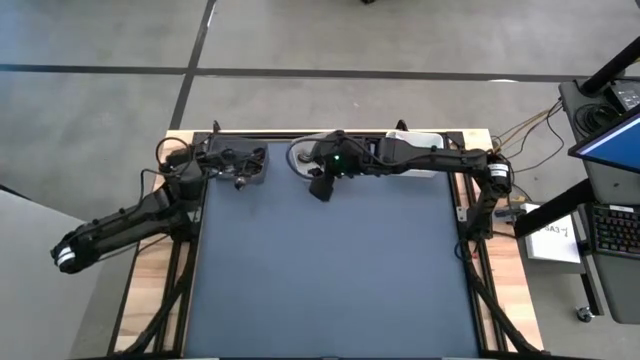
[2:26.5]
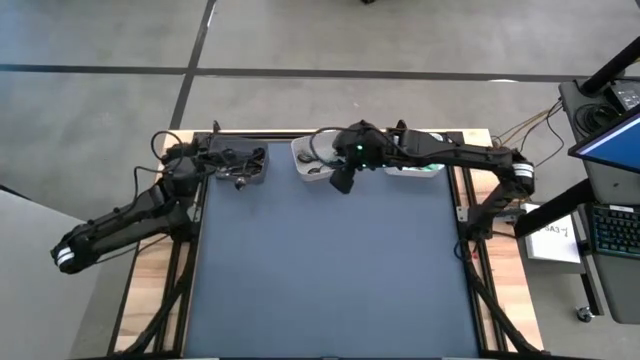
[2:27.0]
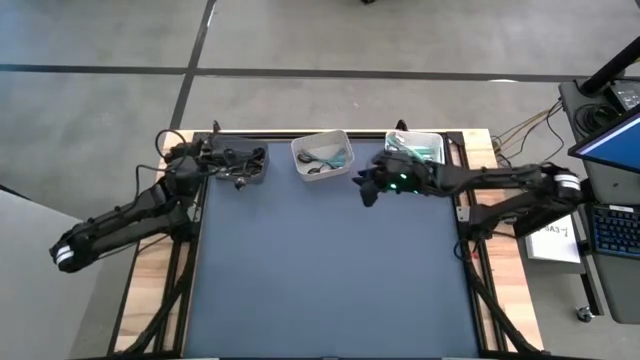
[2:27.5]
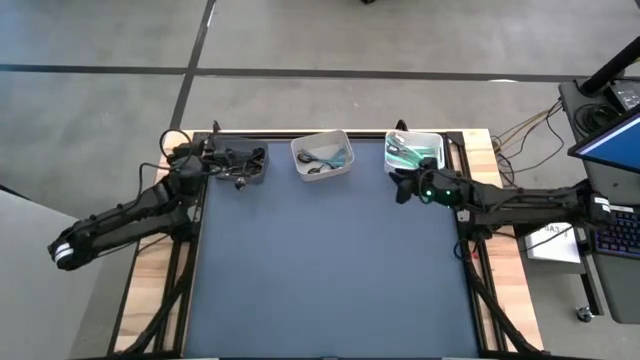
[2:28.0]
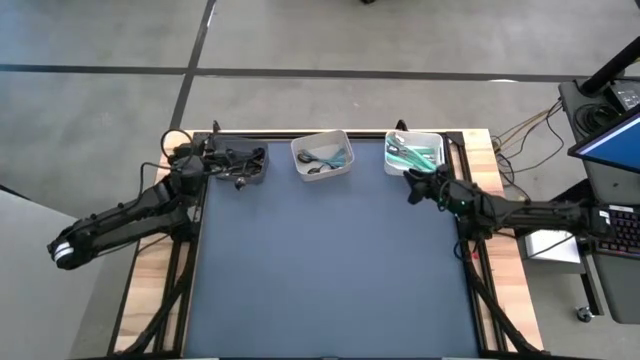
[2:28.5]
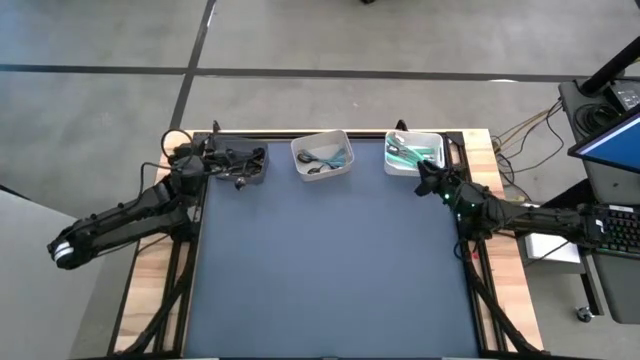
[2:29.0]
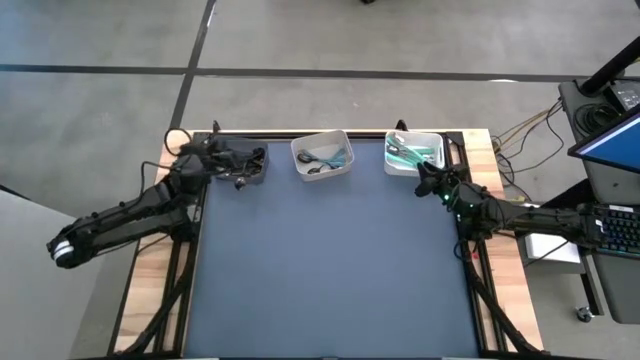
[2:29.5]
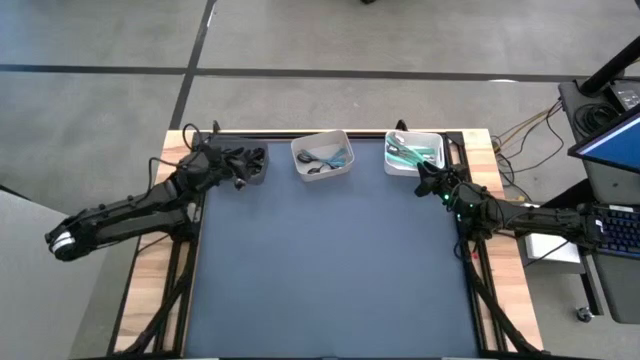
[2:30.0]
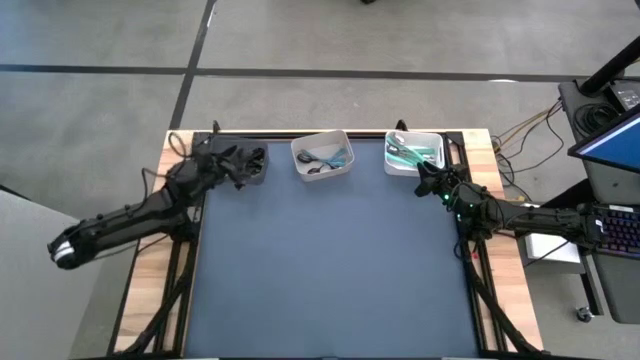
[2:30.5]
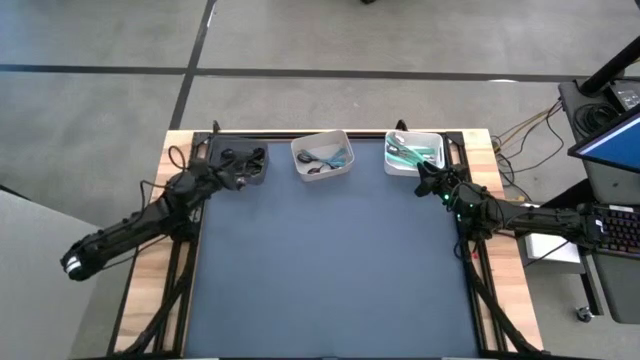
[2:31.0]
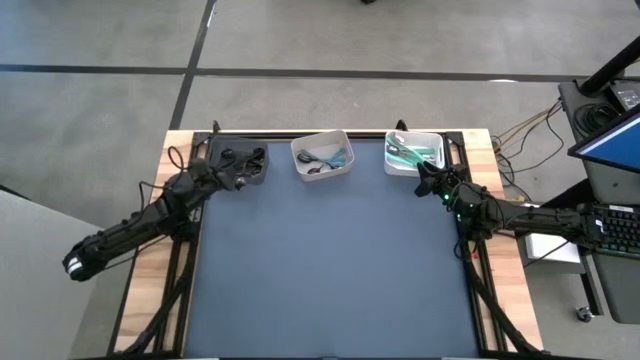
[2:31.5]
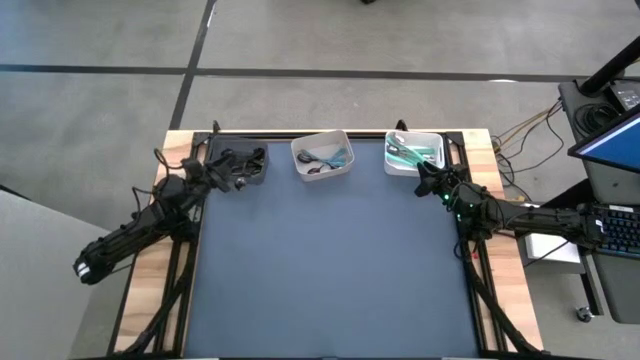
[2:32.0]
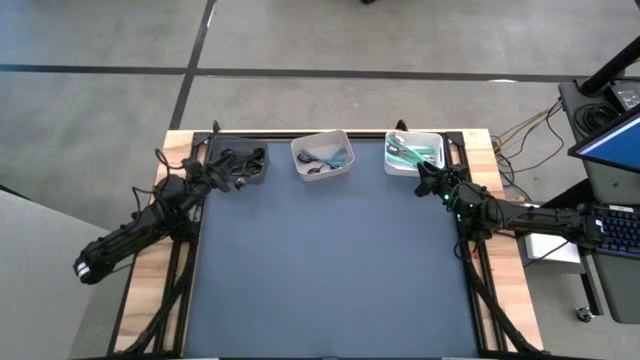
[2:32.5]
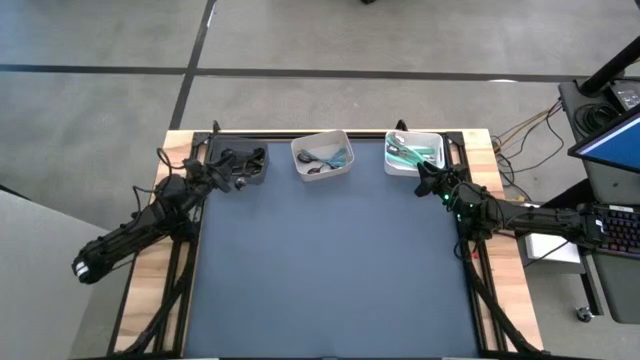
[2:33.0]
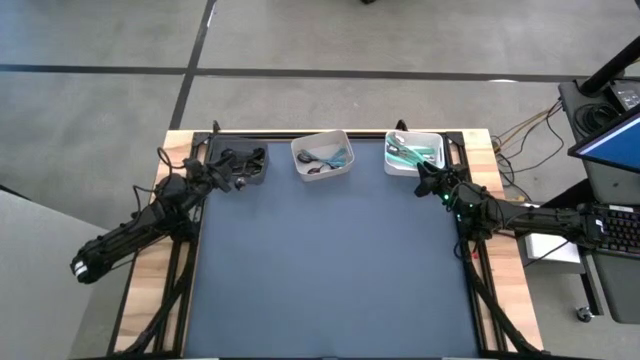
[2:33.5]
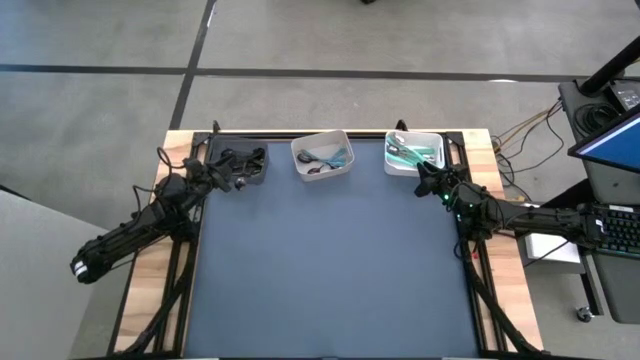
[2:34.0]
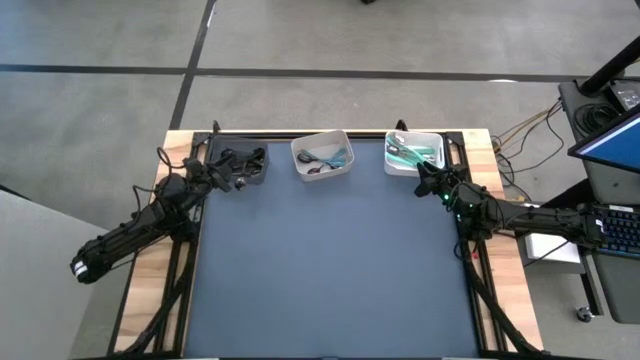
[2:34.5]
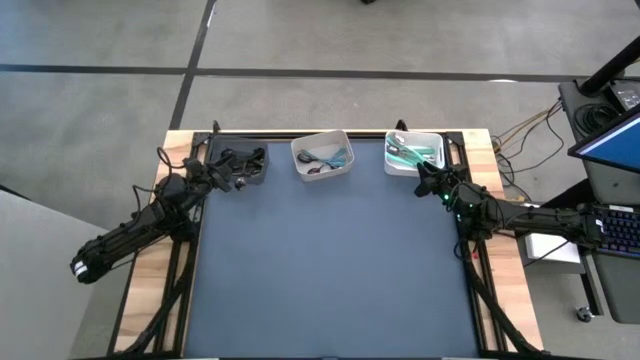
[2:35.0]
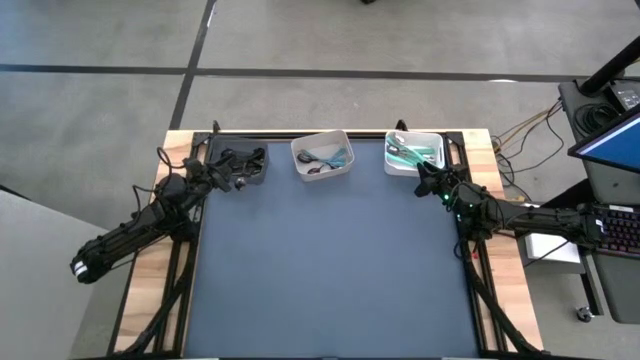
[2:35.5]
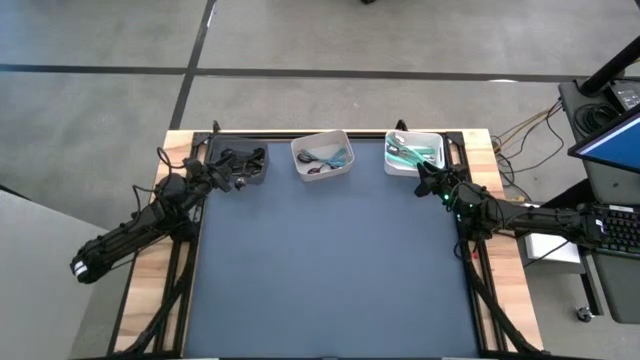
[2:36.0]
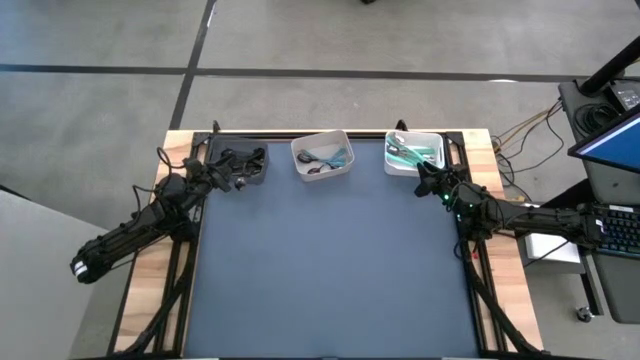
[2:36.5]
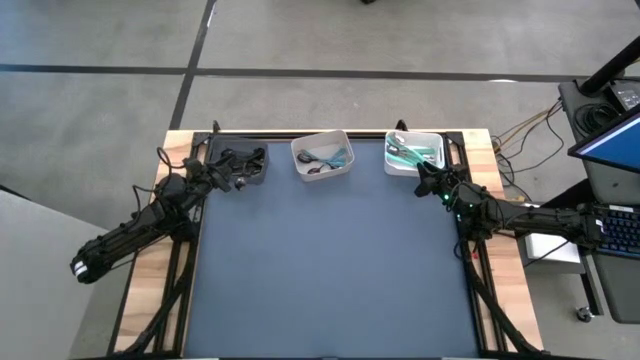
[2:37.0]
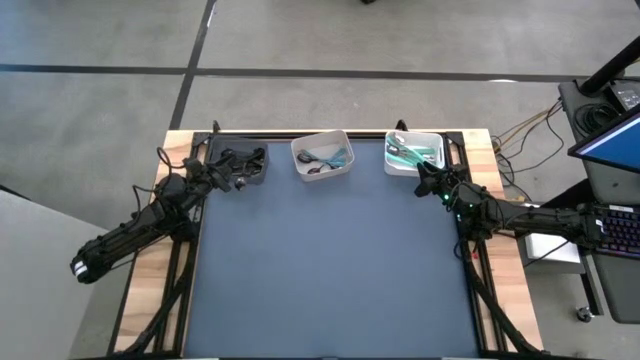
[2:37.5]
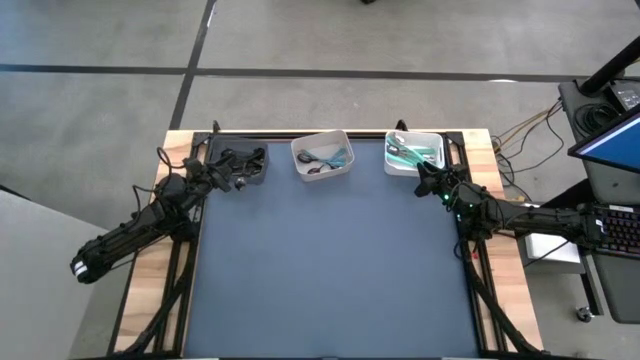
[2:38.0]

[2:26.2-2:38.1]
Task: Sort silverware by color (type)
Return to Home Position

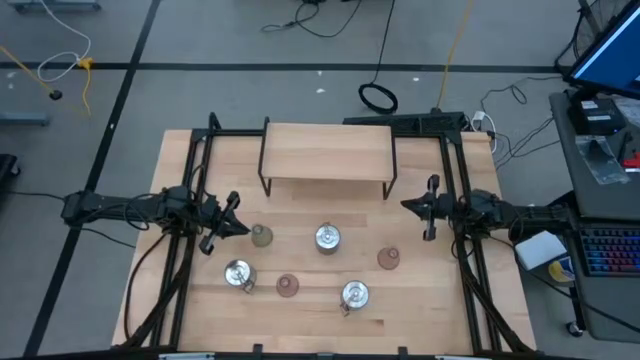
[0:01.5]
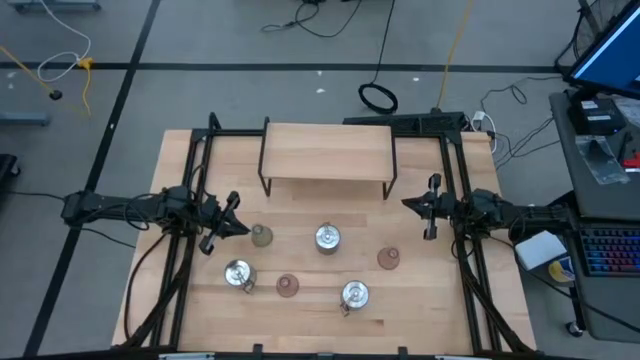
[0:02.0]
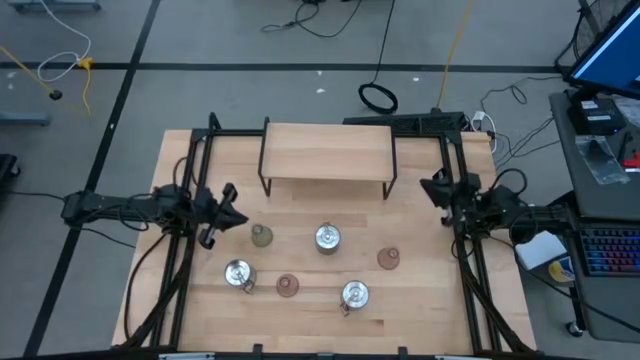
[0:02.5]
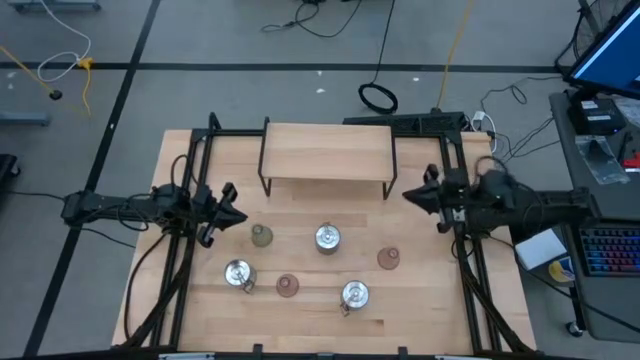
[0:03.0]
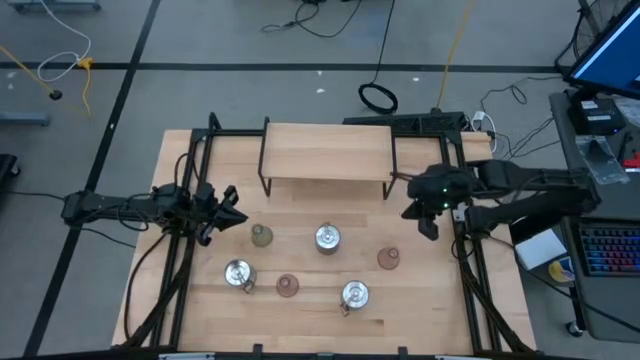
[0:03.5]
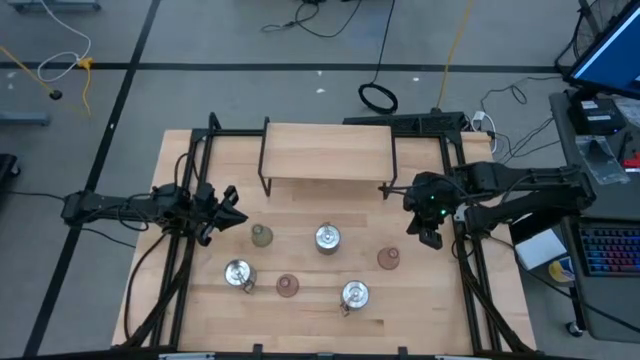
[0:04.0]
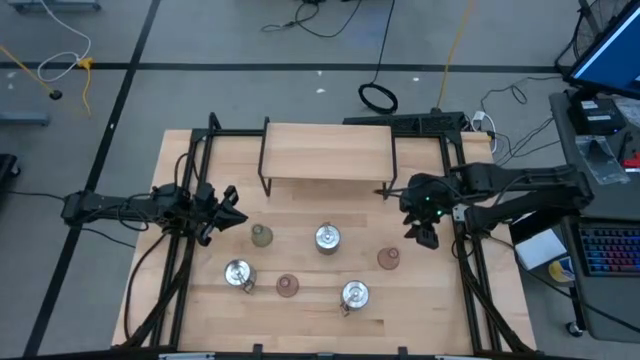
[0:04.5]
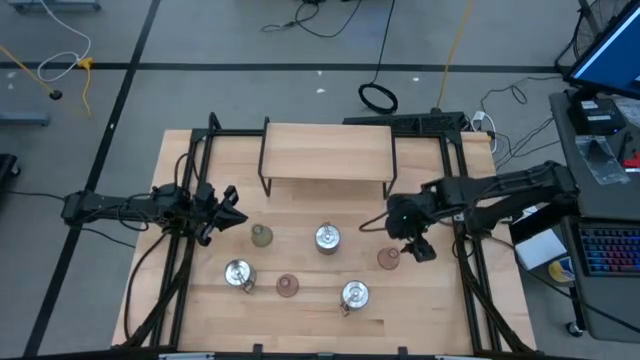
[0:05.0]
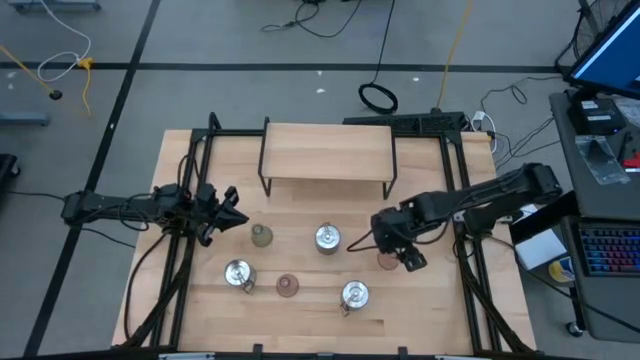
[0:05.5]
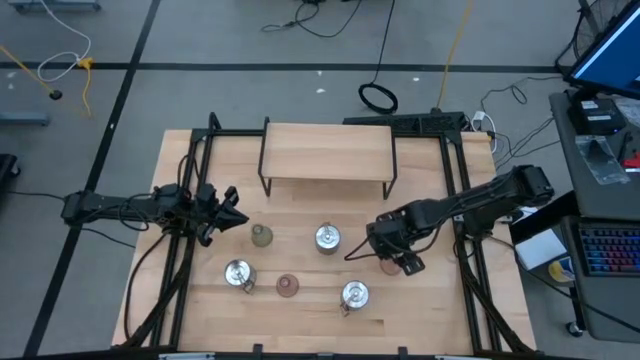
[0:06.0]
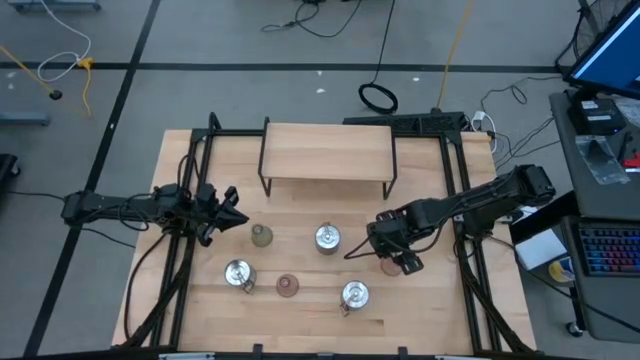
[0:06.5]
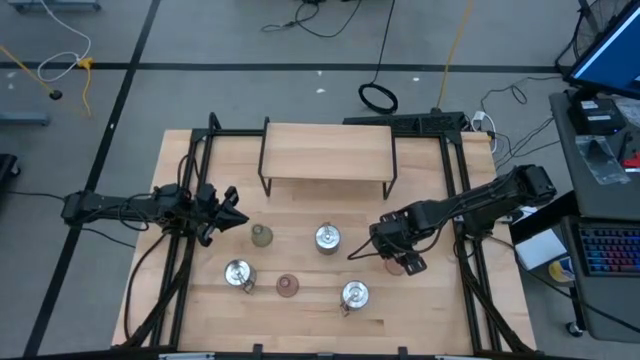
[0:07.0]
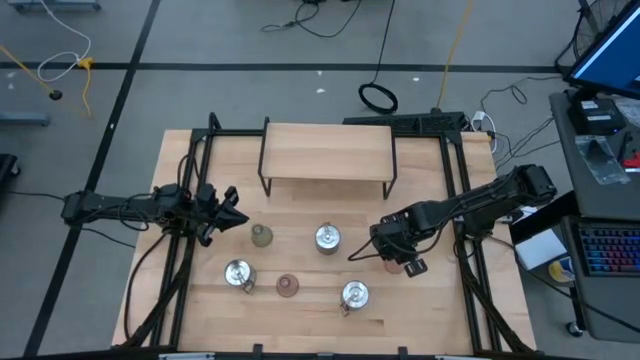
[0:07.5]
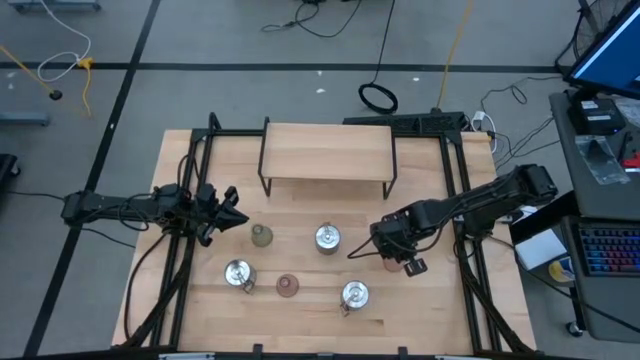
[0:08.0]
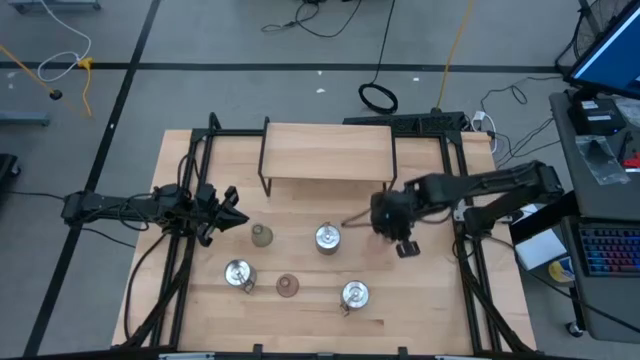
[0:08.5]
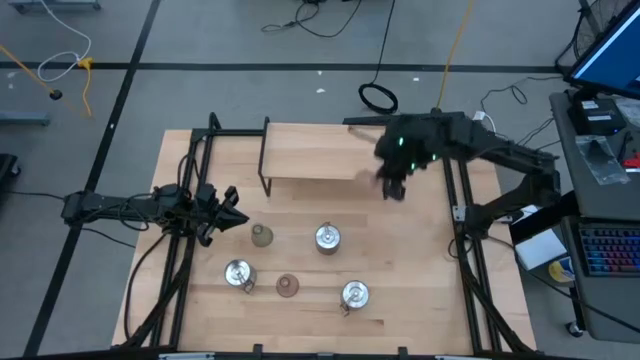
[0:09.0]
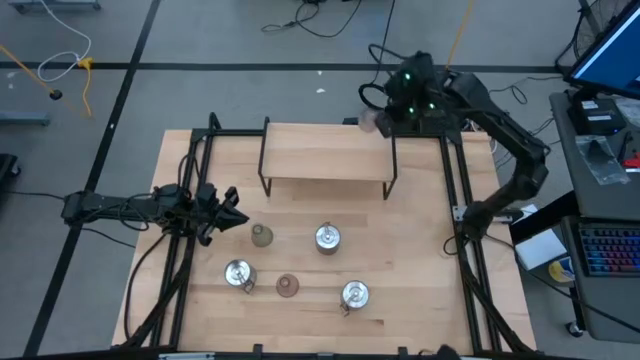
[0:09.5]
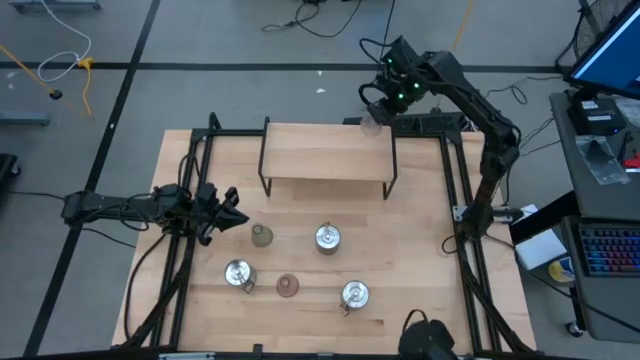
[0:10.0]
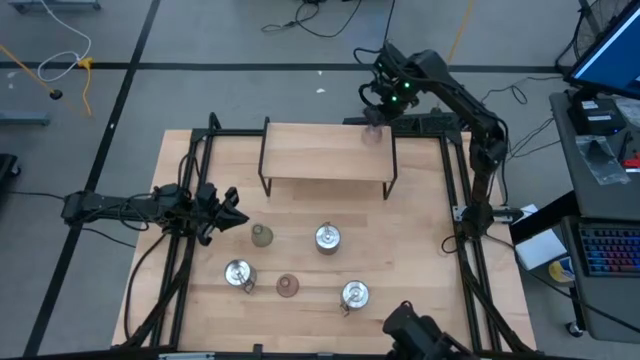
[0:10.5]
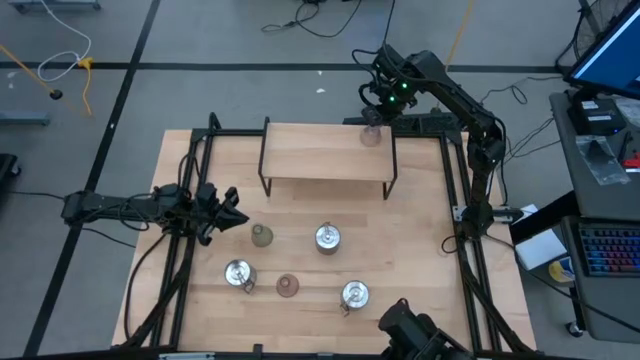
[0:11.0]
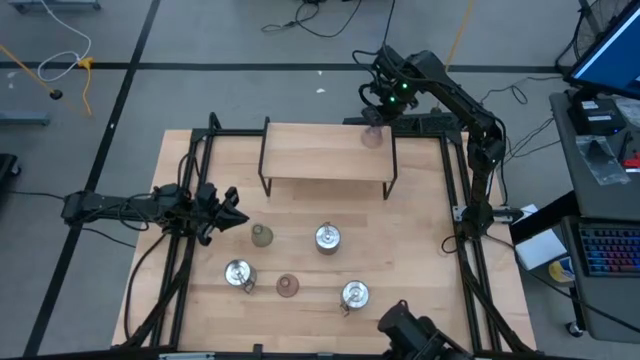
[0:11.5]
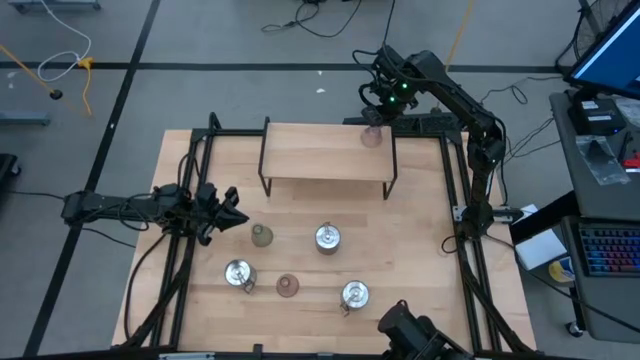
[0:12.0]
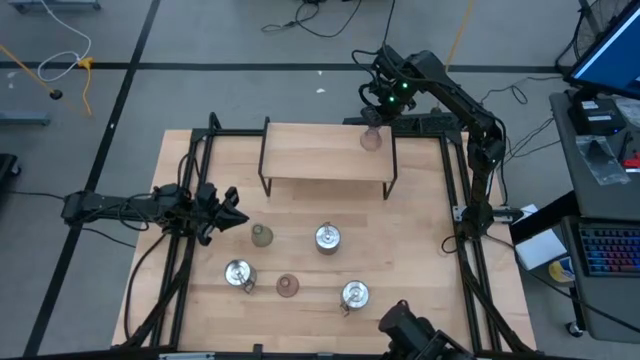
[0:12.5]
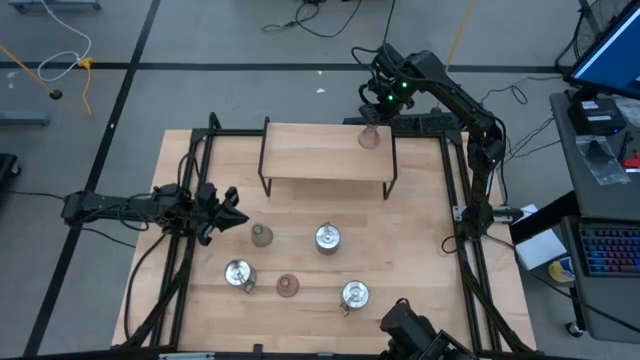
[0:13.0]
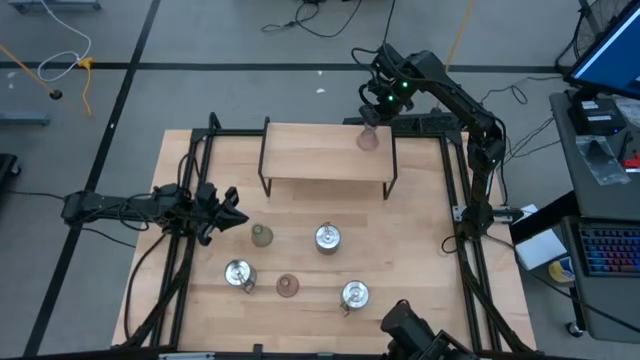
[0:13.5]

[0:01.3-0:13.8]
Task: Pick & Place candle stick holders
Put the right pink candle holder on the shelf
